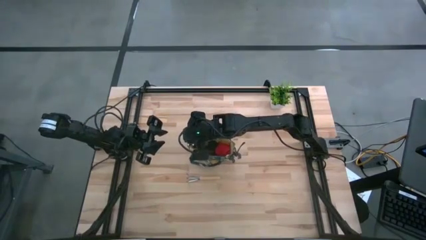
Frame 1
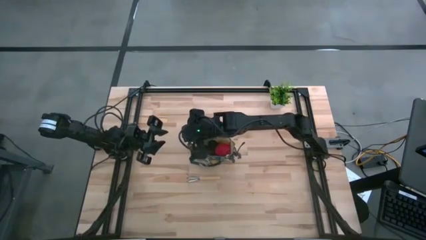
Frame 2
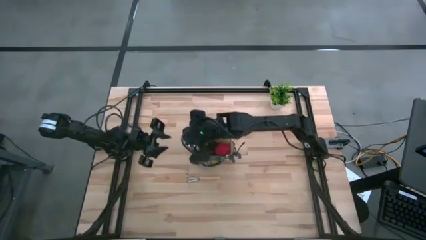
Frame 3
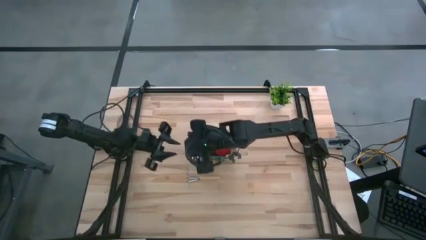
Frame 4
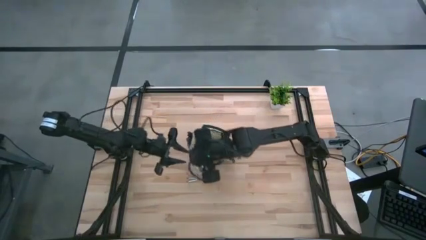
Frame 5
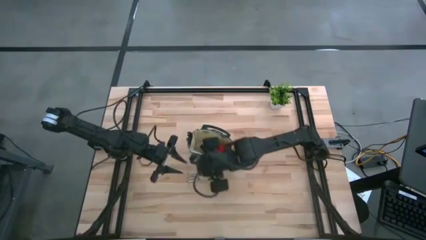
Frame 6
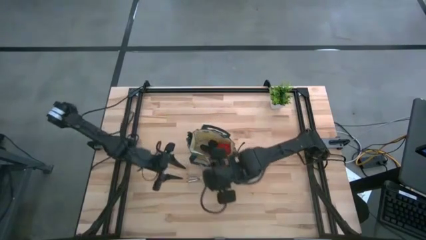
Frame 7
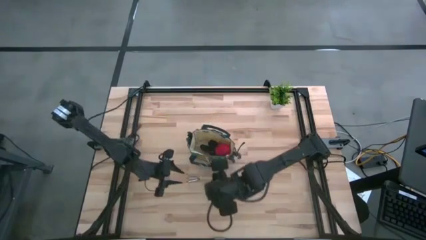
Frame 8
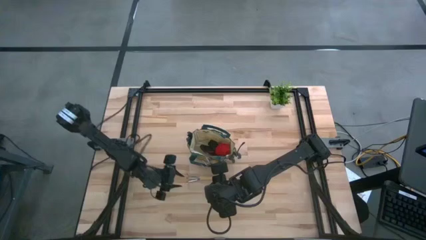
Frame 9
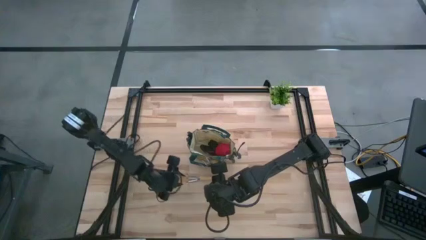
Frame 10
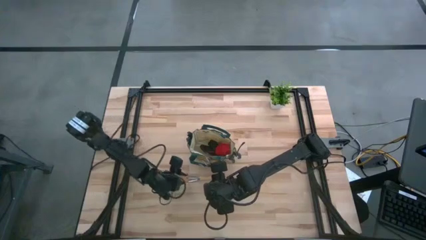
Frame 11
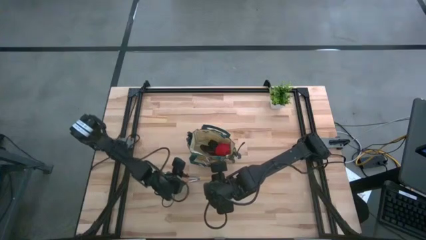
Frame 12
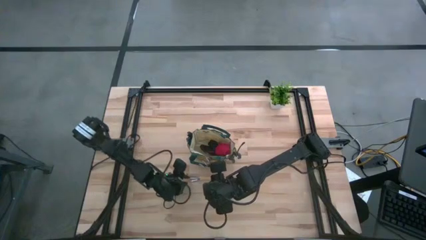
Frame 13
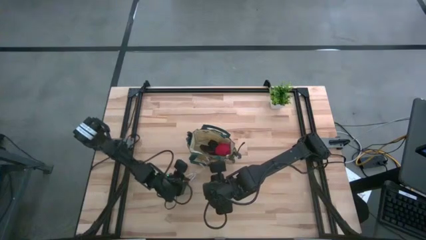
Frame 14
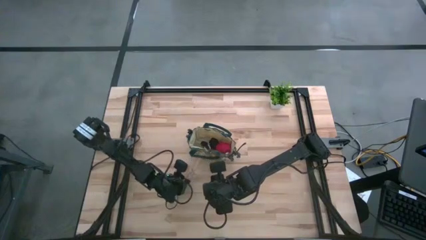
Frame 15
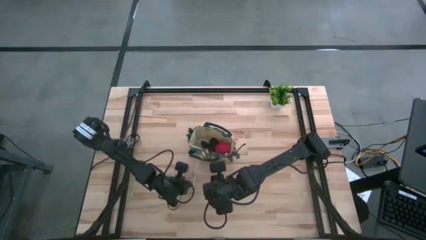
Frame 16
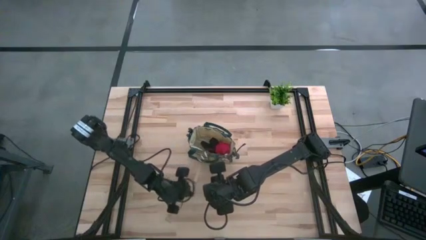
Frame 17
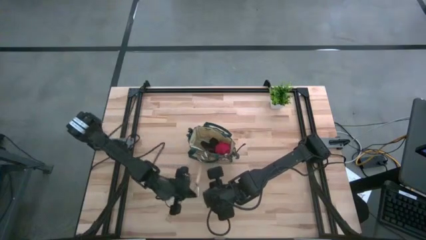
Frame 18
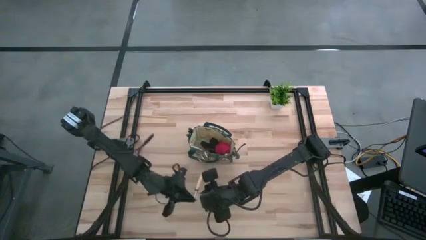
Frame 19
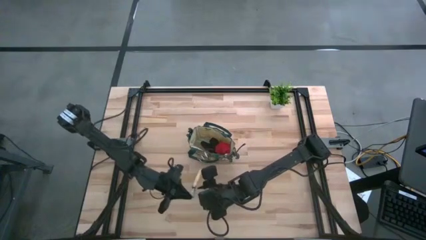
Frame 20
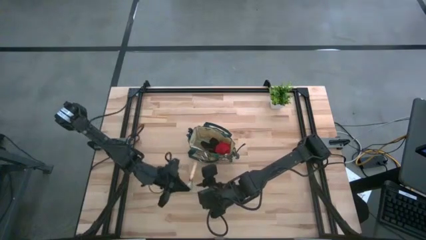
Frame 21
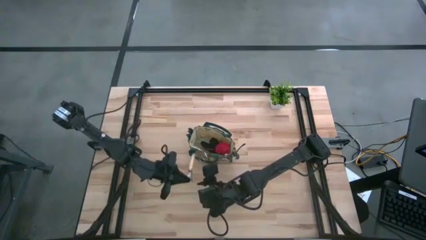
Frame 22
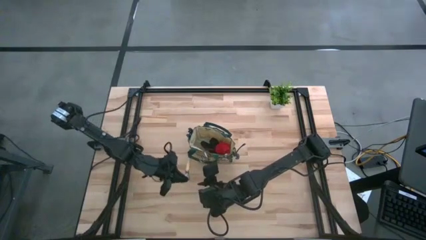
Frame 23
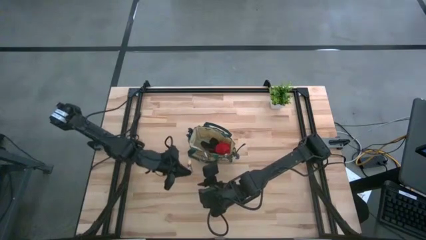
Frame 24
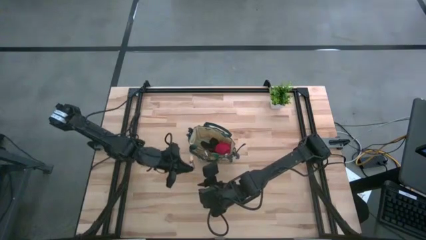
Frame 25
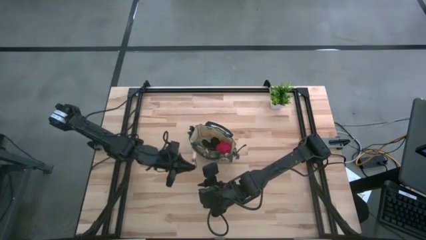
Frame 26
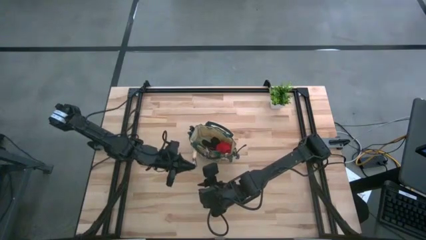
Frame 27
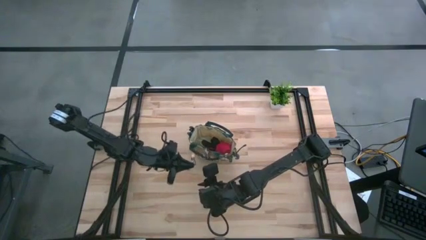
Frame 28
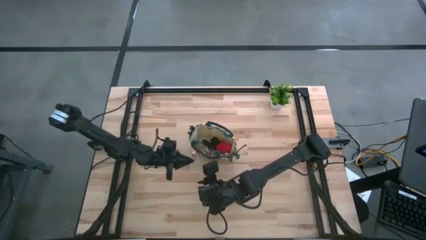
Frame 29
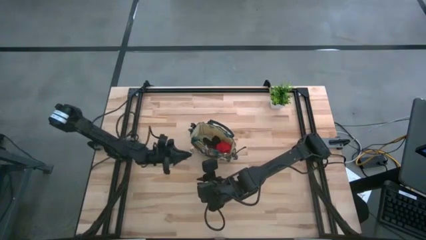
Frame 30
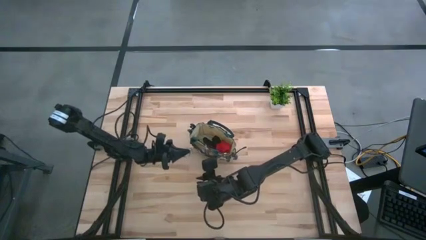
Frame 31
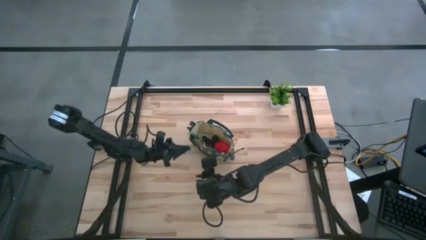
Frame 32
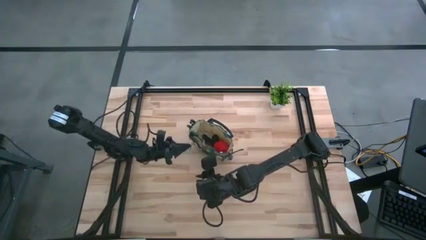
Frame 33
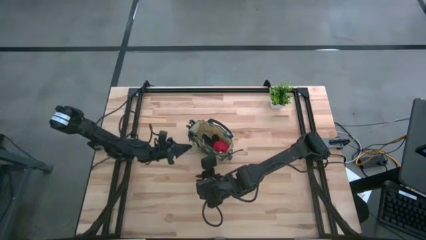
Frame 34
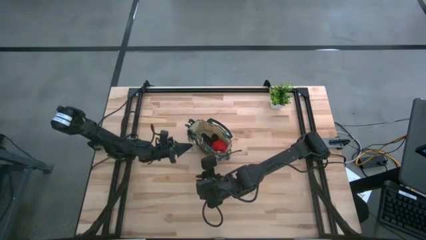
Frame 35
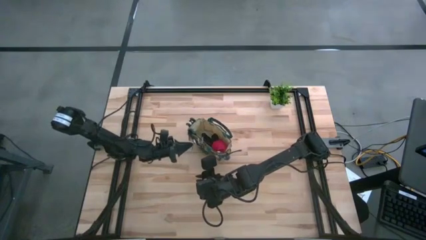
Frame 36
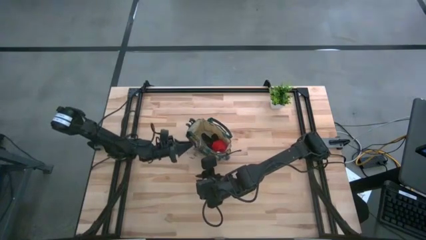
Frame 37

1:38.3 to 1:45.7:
Task: Pick & Place Garden tools in Gardening bag
Put the brown hand rake into the brown gardening bag

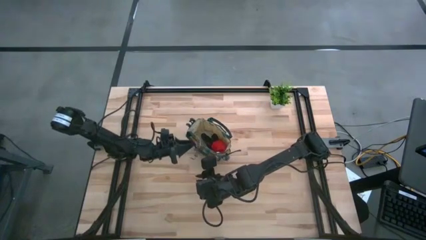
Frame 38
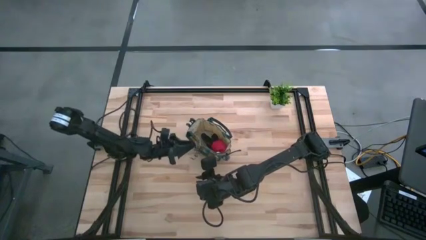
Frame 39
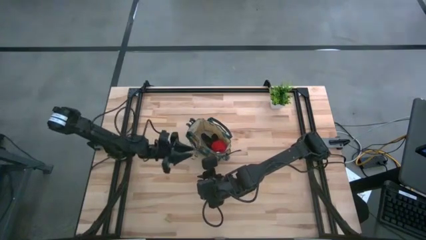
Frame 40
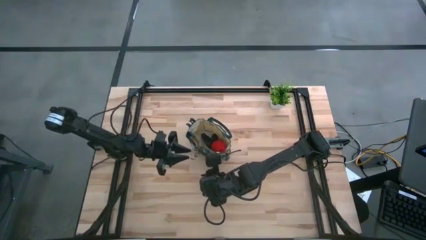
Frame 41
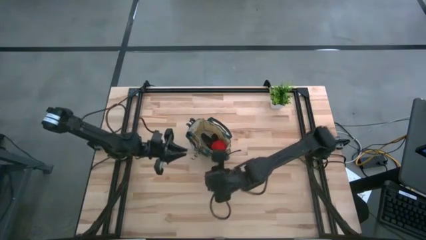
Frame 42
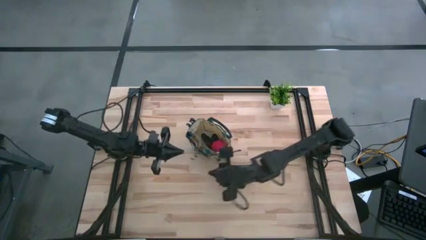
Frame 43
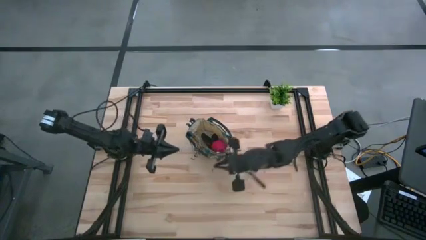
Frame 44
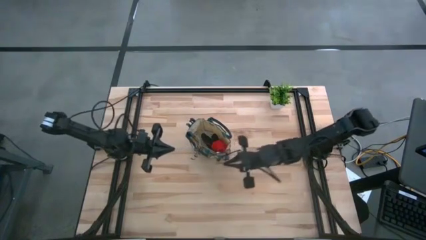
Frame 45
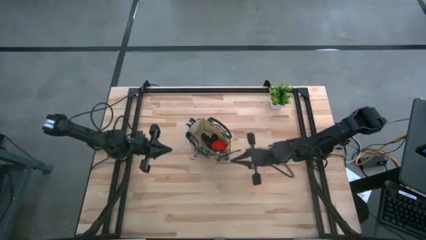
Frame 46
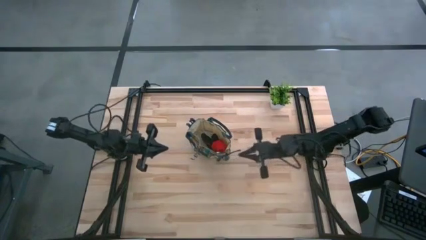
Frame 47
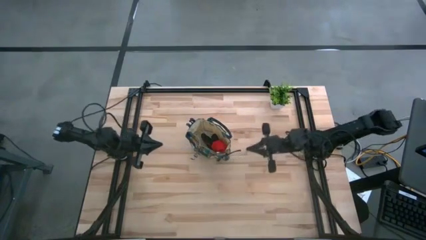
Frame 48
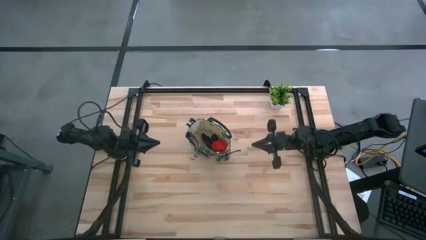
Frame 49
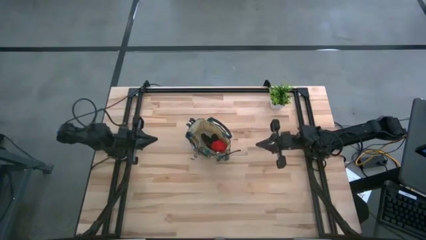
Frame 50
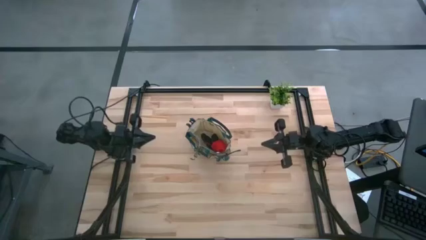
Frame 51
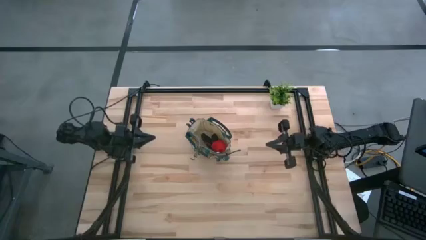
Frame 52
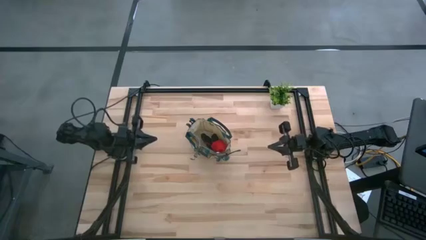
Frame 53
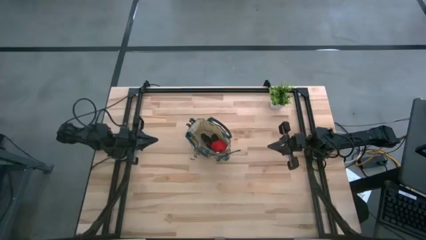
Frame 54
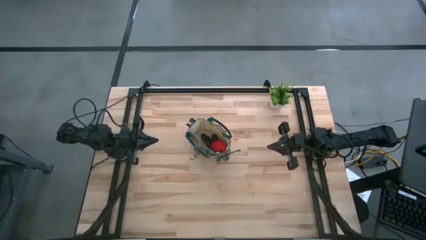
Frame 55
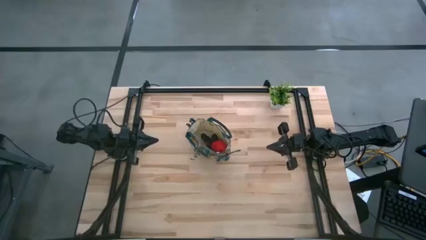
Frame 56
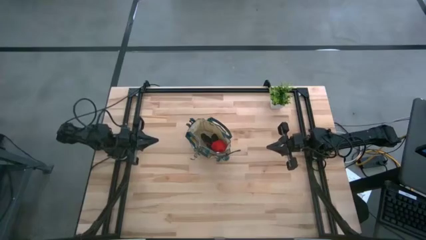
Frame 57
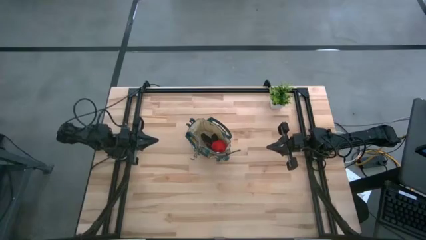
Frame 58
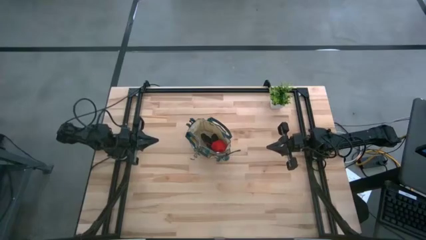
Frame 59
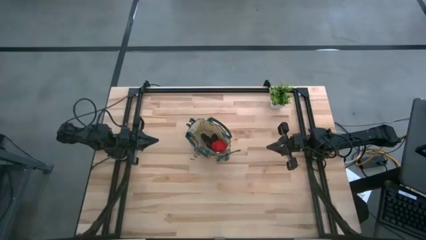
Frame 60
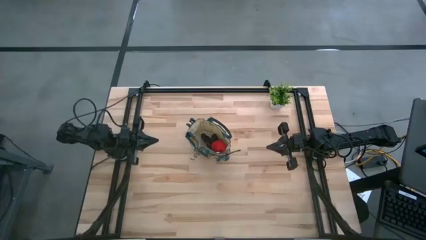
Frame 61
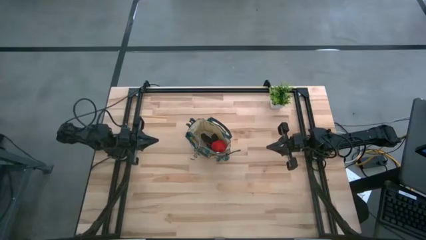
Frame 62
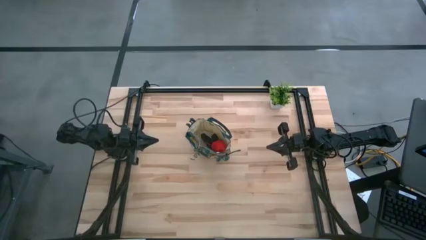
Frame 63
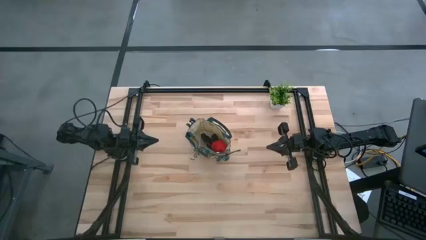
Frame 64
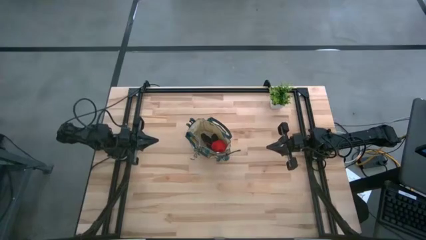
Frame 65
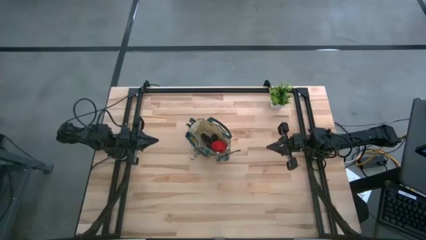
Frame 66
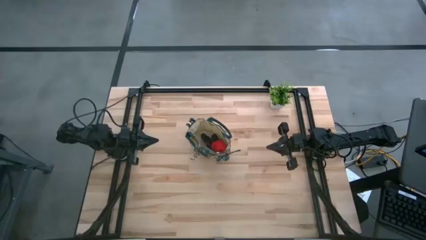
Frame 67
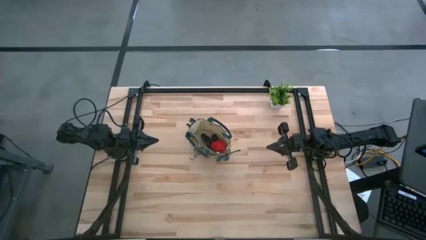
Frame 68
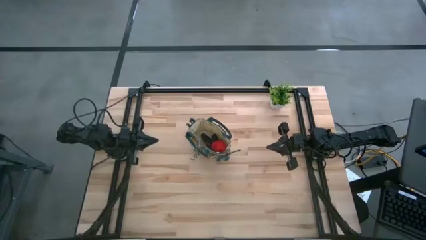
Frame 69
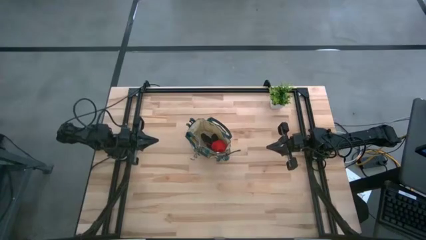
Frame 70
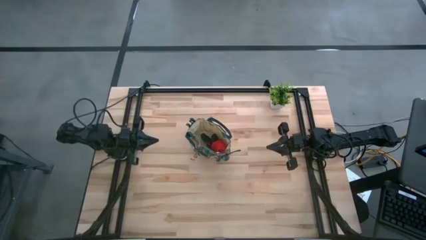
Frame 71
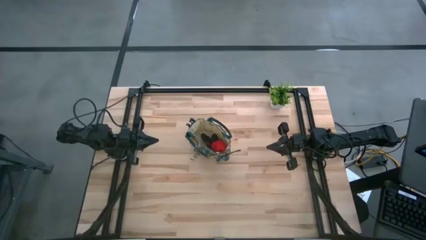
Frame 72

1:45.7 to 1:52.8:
Return to Home Position

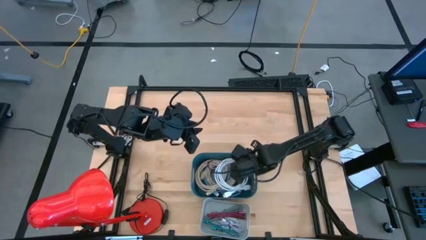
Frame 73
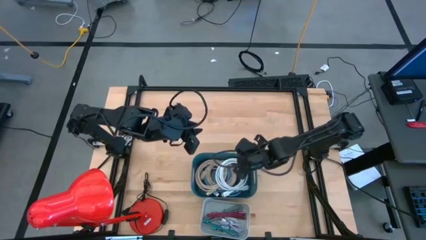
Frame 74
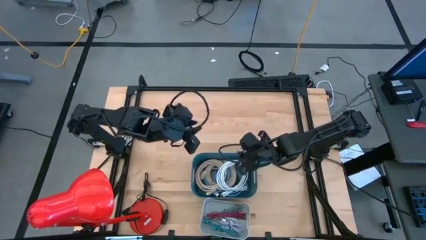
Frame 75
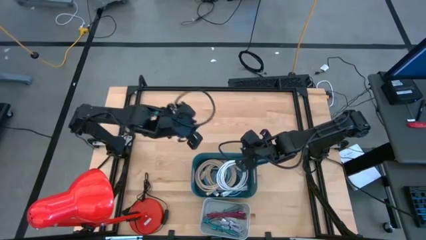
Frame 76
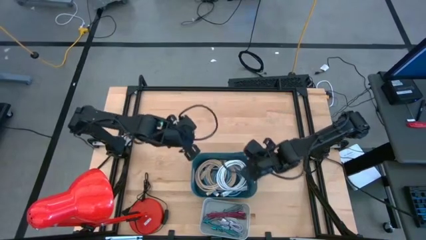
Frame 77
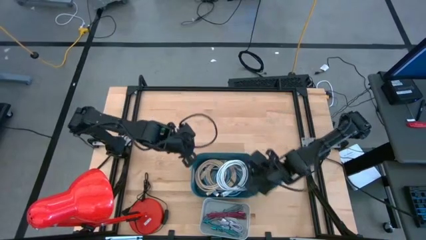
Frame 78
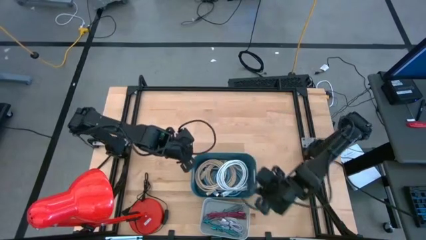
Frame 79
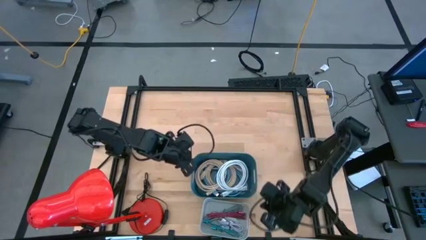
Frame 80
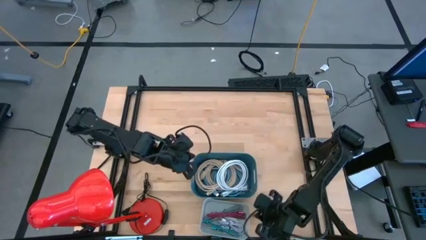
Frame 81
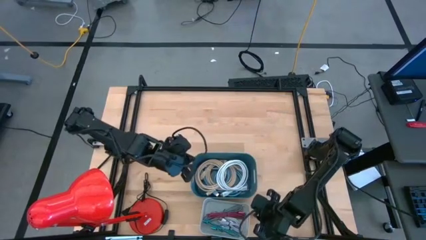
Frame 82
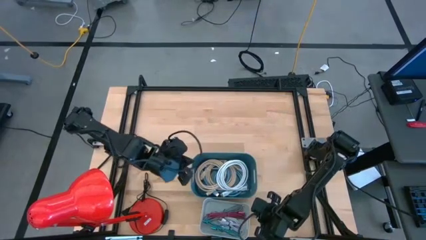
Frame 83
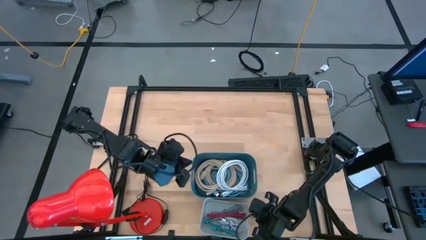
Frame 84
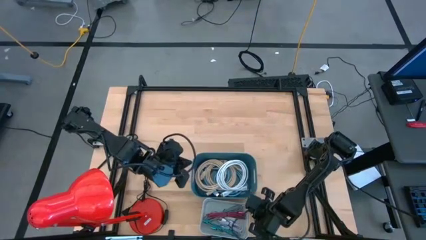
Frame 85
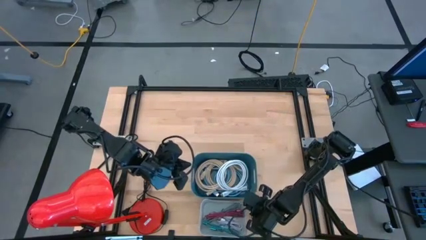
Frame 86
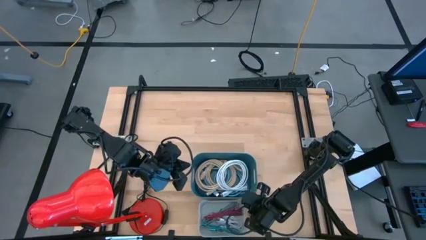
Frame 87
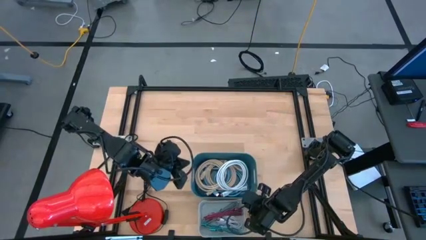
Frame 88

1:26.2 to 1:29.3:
Task: Pick & Place USB Port
Adjust the gray bin on the table

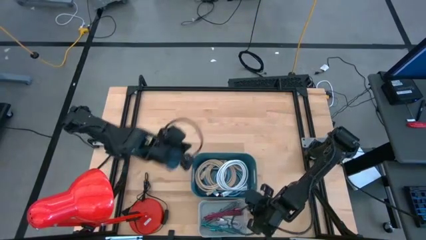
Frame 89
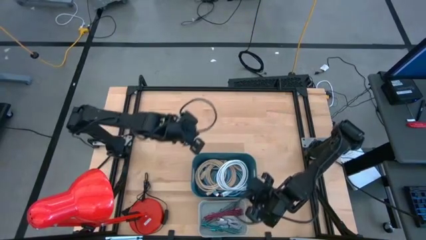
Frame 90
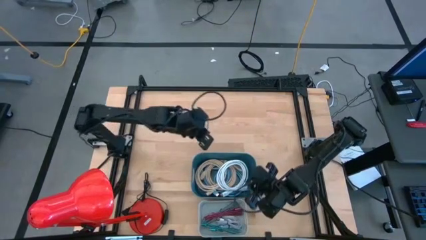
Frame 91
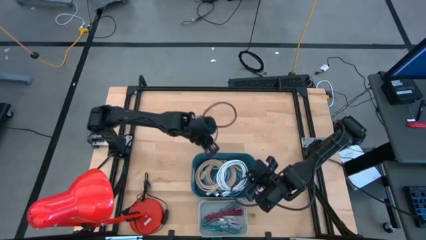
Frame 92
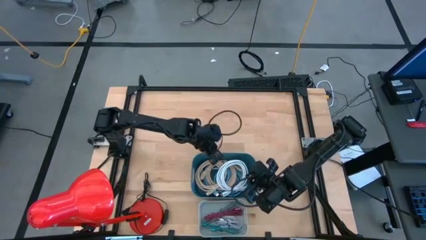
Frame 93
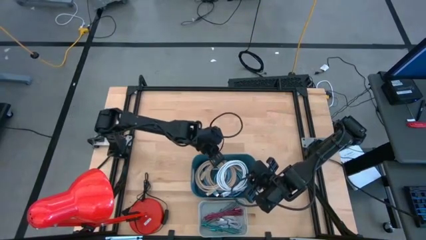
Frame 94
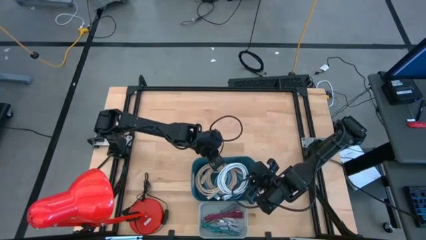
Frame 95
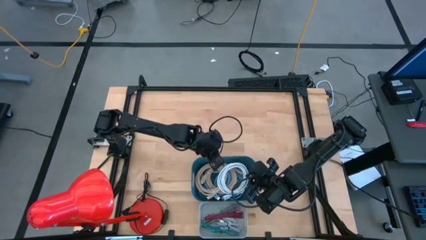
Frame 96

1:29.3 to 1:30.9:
Adjust the blue bin on the table
